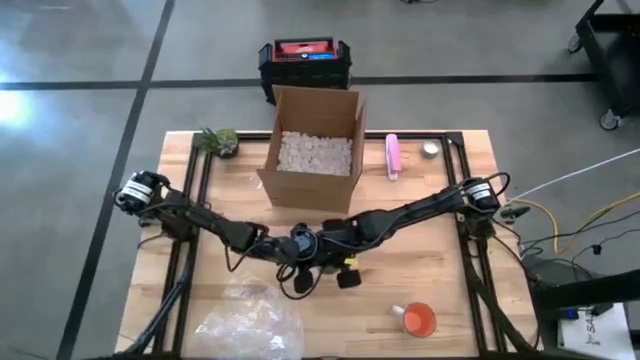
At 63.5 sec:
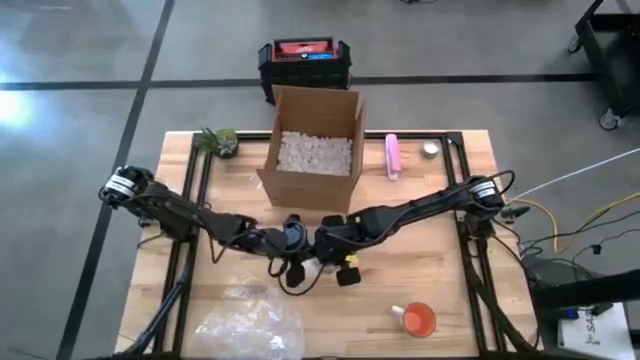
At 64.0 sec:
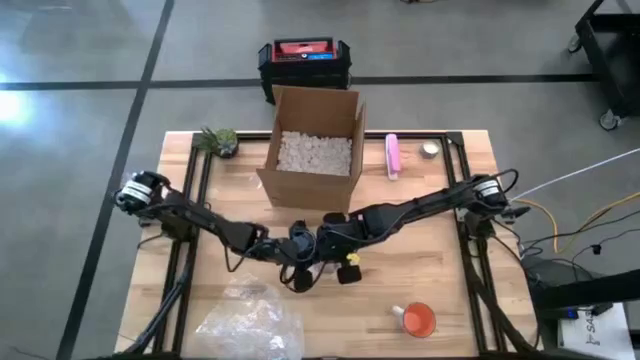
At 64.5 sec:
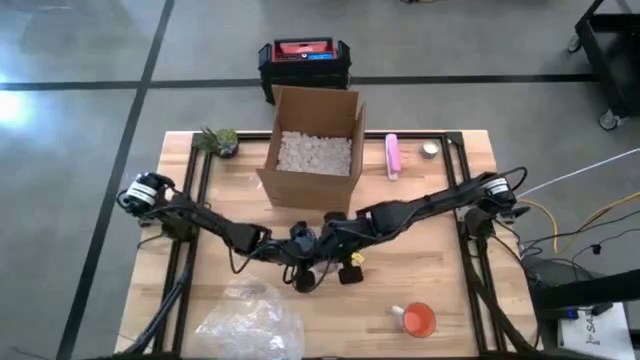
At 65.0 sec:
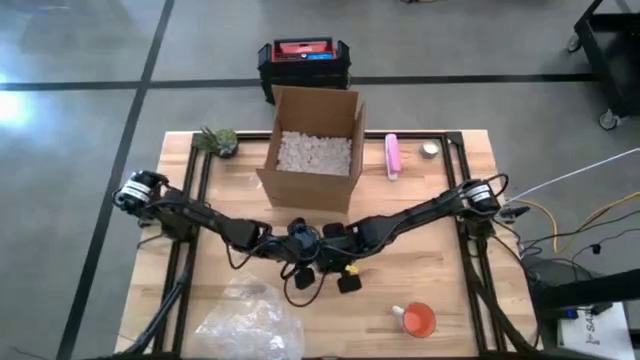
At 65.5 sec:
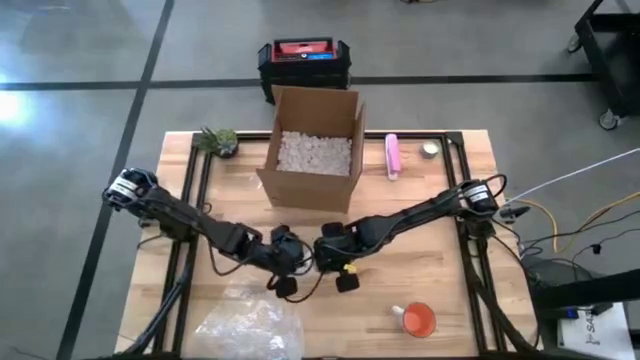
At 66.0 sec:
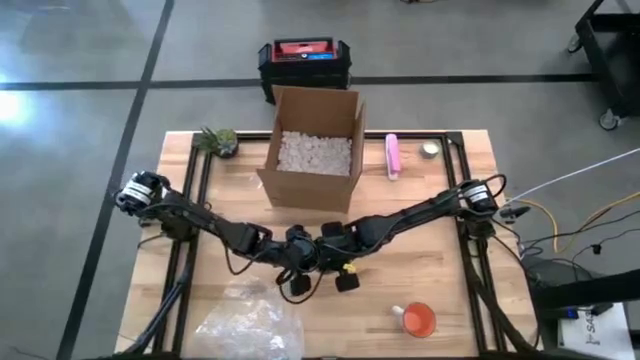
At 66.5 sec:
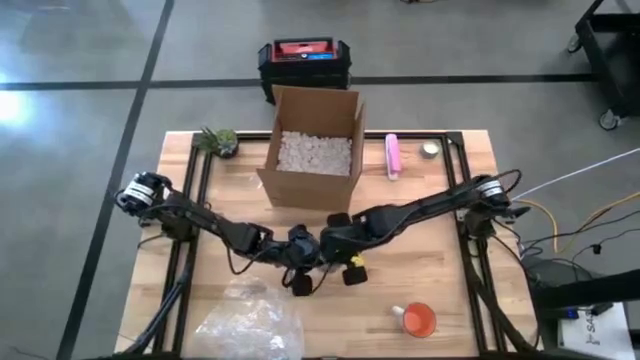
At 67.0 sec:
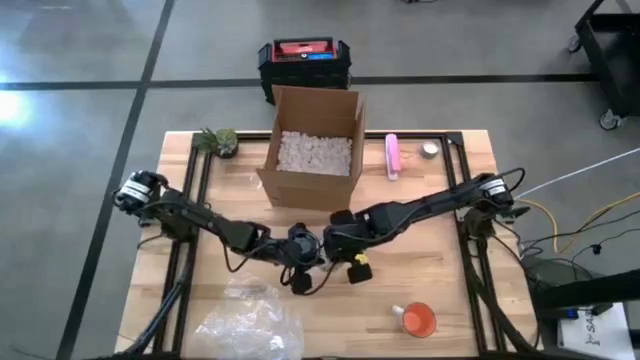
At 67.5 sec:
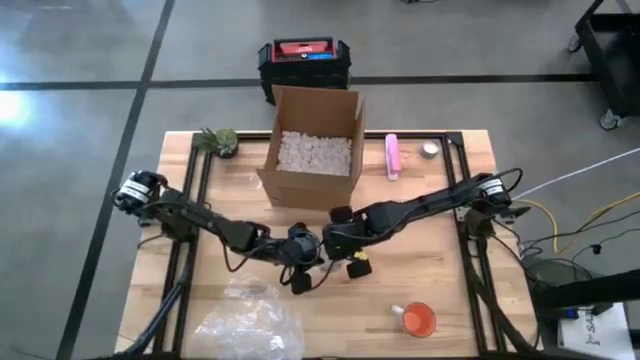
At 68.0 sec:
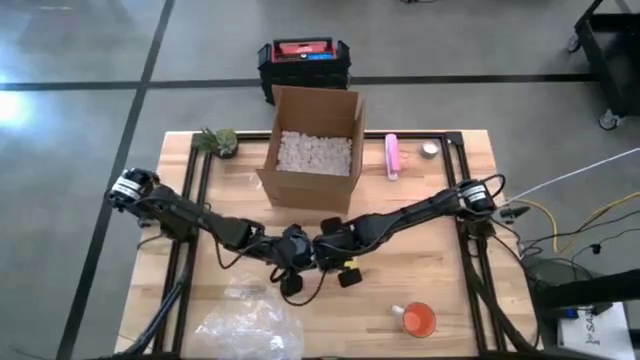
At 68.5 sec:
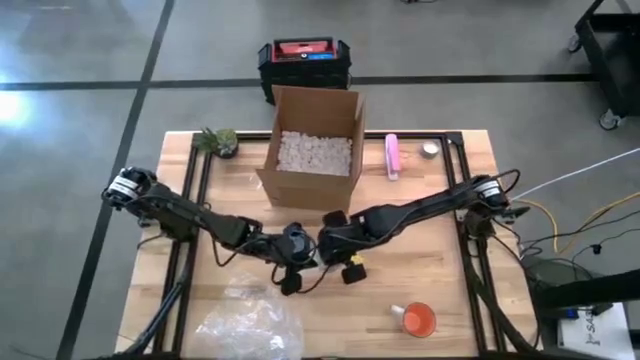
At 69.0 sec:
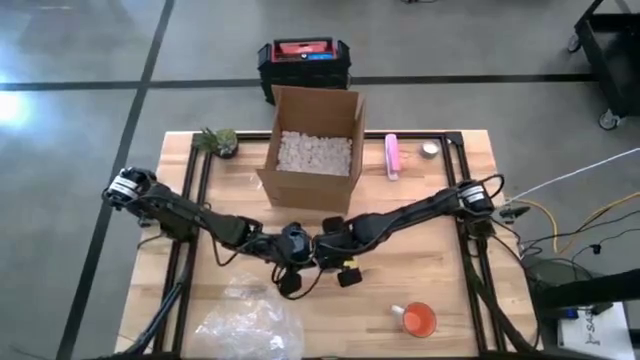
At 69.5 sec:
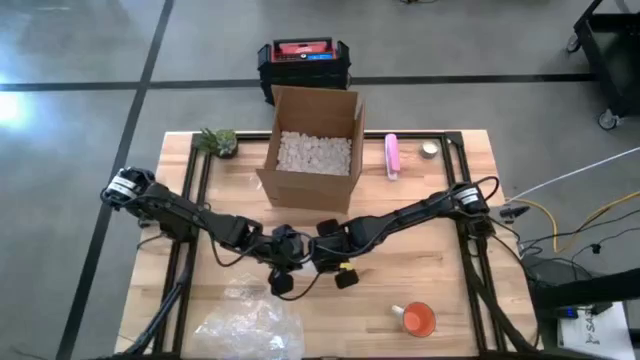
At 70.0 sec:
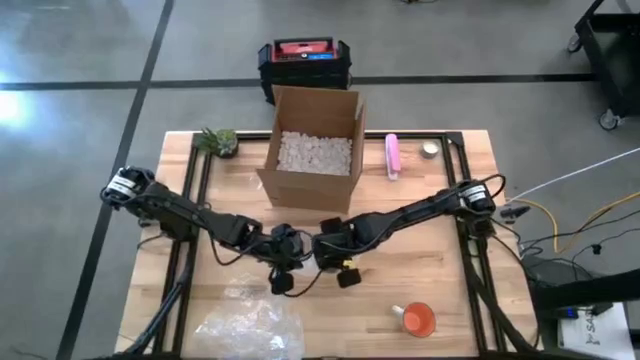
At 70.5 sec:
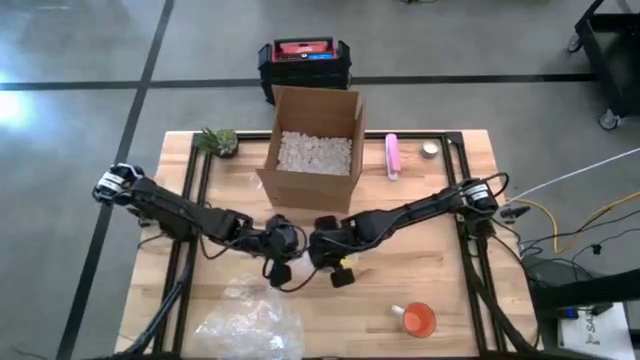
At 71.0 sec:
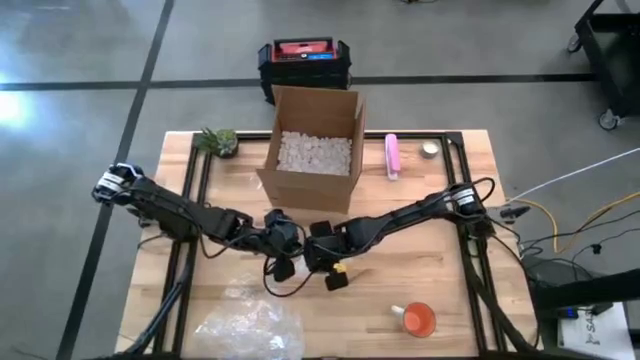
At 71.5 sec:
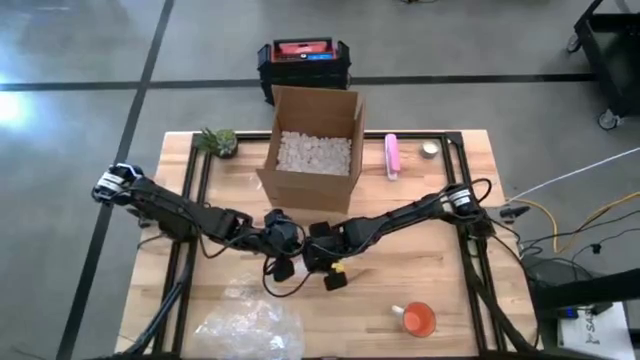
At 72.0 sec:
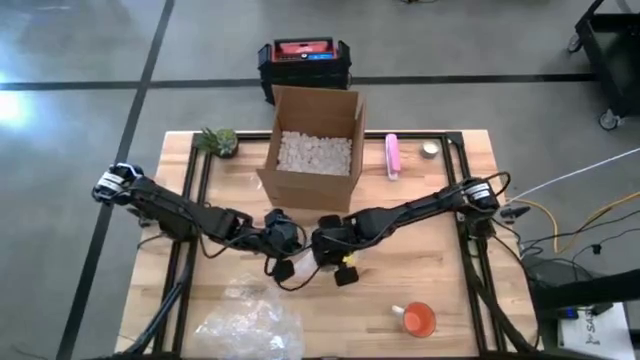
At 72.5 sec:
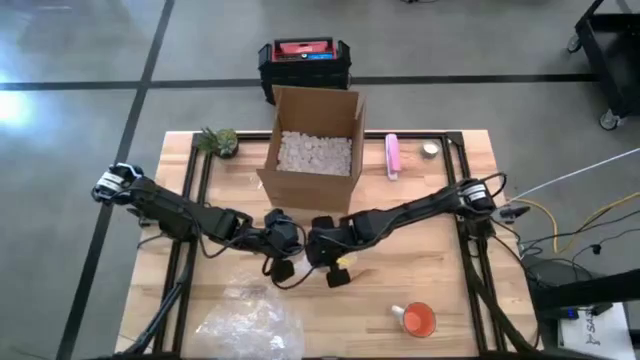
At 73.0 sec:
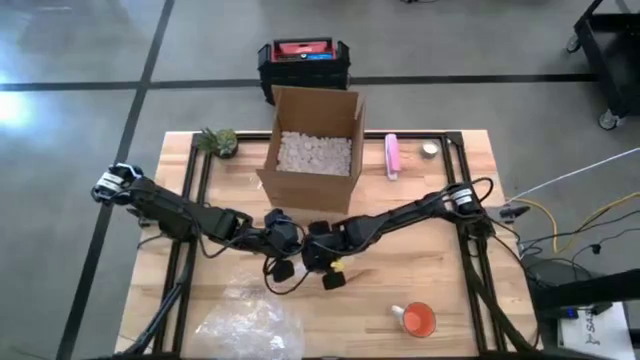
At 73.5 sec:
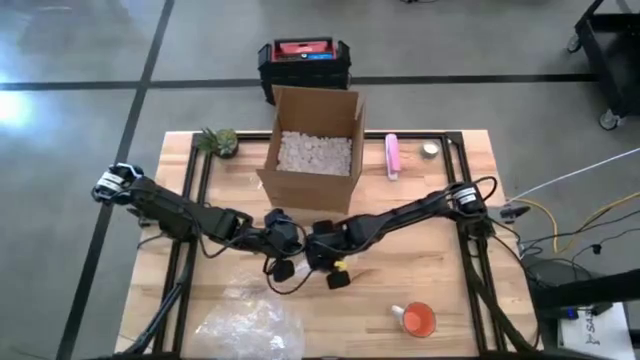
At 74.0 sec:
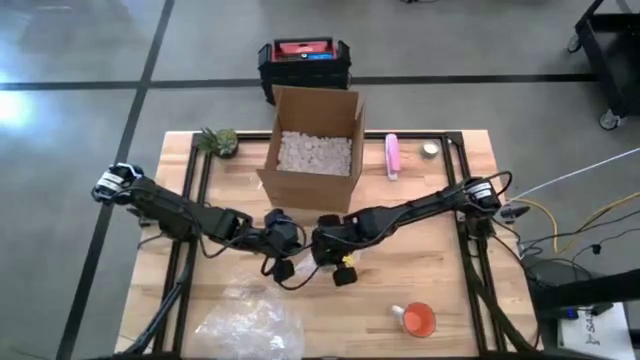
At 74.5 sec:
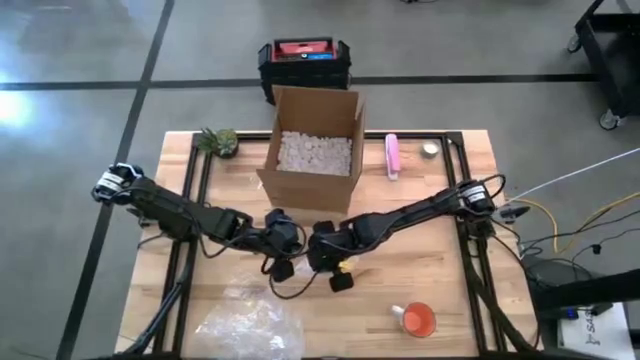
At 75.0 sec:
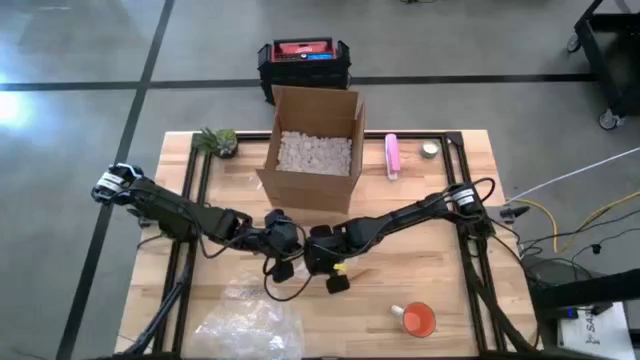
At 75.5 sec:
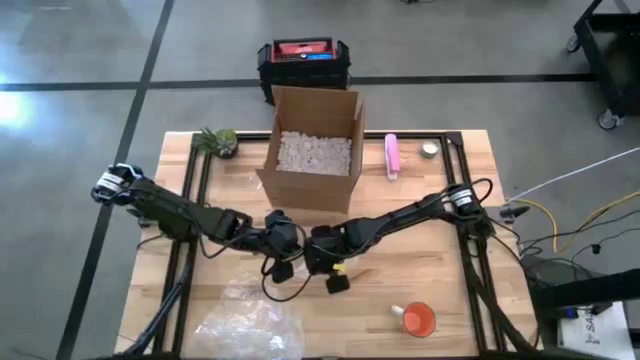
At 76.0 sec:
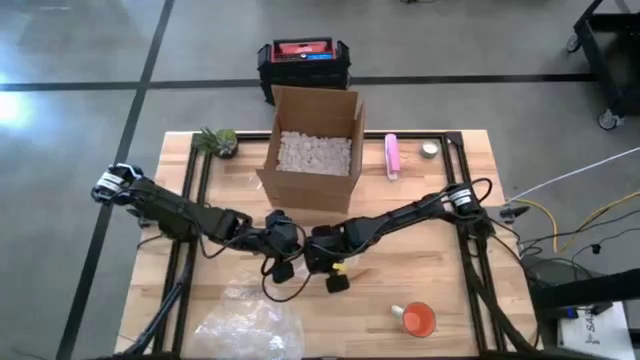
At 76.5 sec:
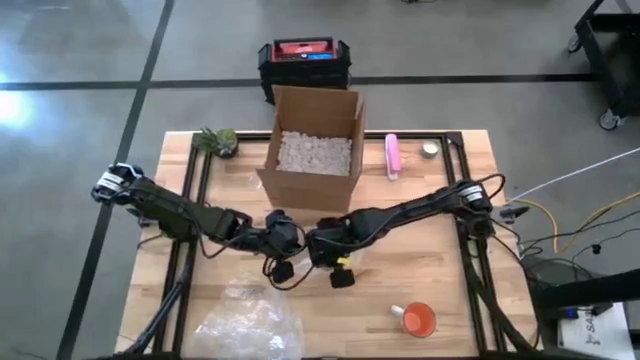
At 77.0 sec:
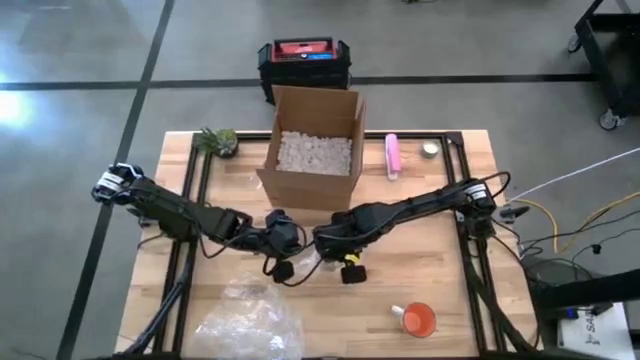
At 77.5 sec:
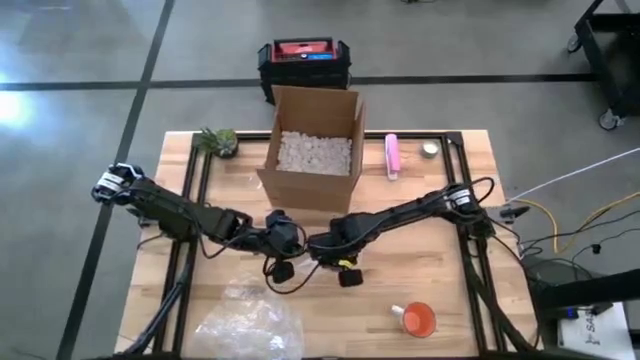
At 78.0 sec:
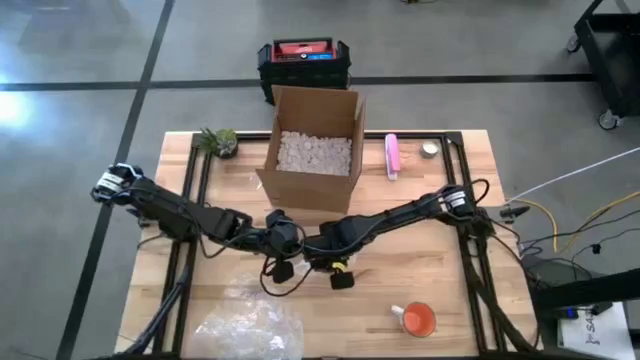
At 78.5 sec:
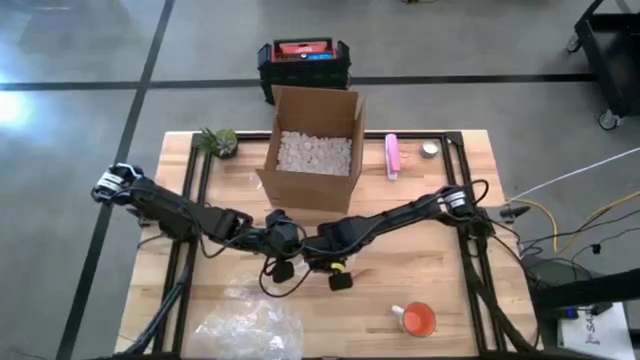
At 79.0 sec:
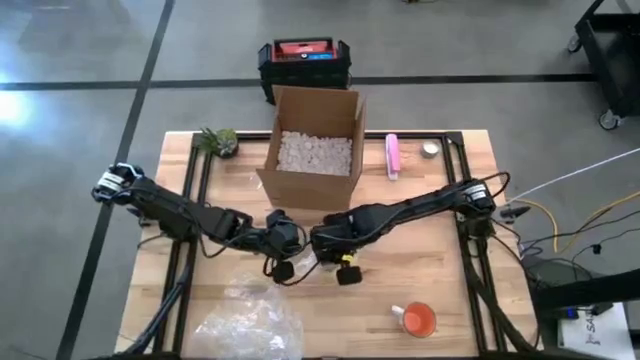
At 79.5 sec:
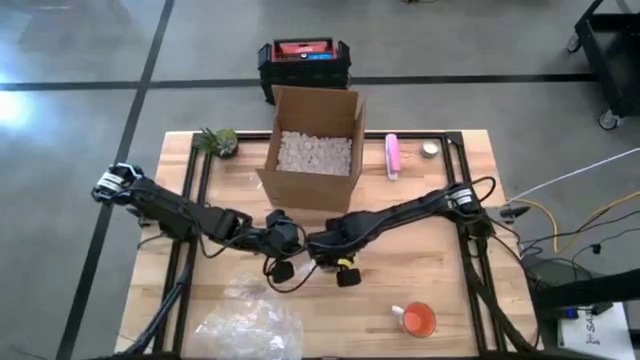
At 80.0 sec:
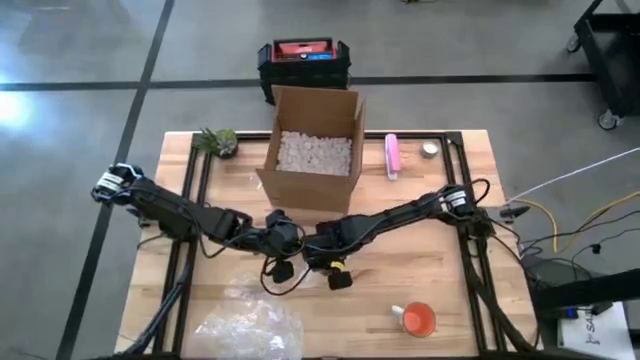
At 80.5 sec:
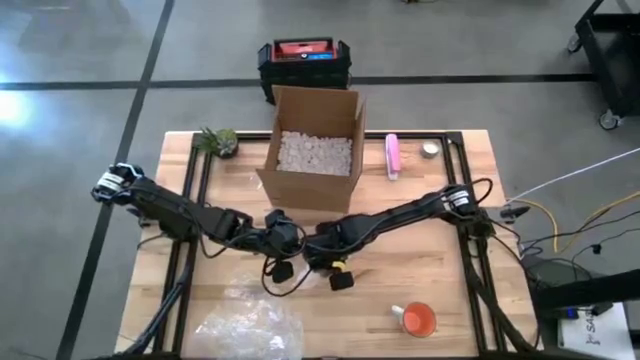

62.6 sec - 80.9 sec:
Task: wrap mug
Wrap the yellow mug with transparent bubble wrap

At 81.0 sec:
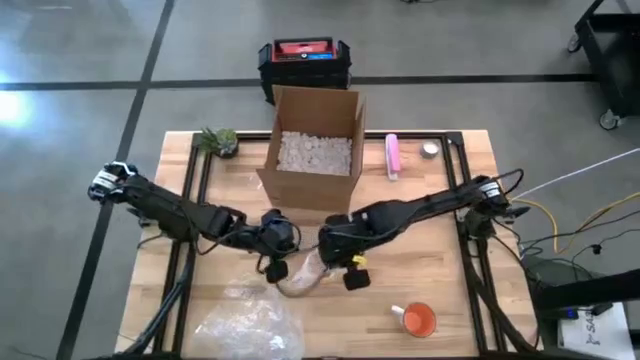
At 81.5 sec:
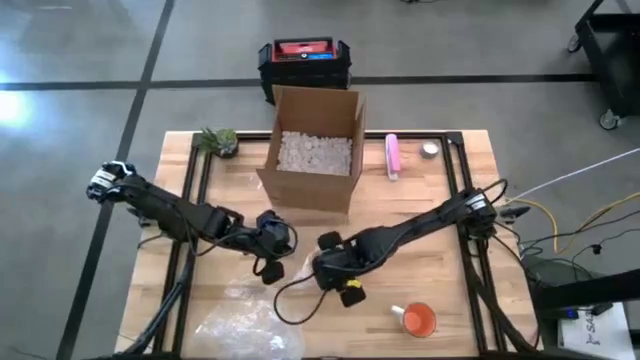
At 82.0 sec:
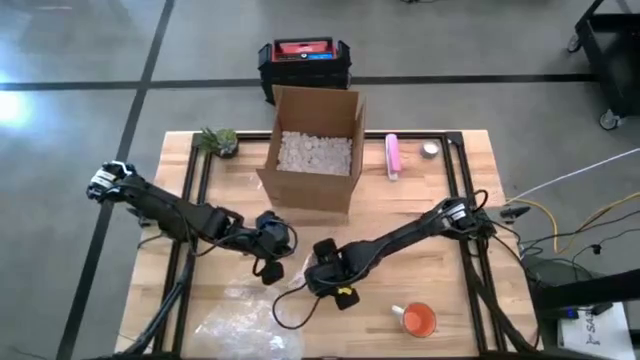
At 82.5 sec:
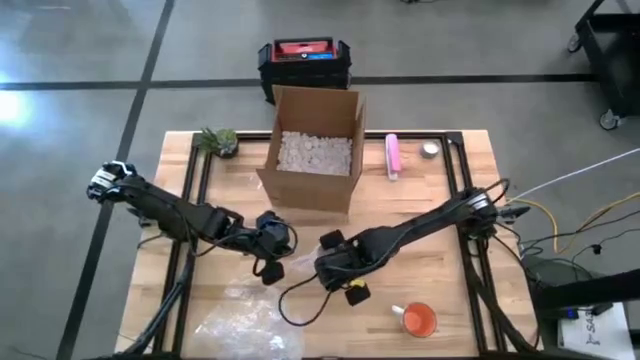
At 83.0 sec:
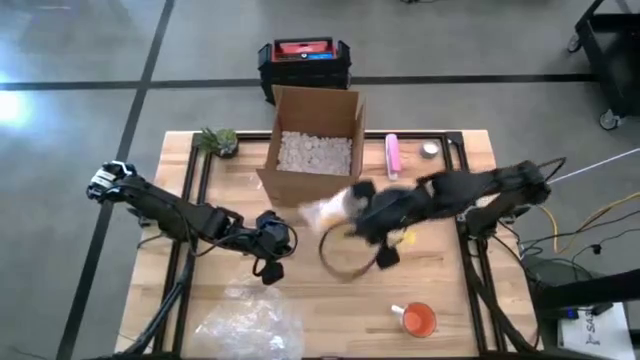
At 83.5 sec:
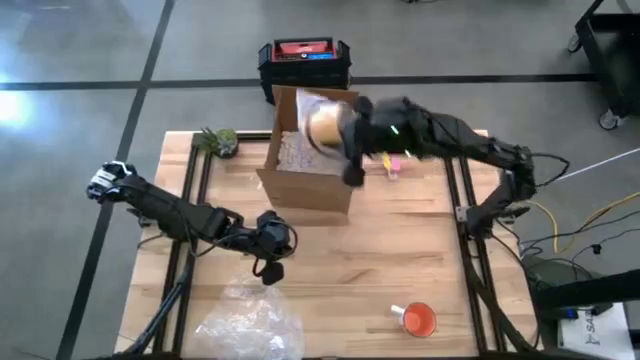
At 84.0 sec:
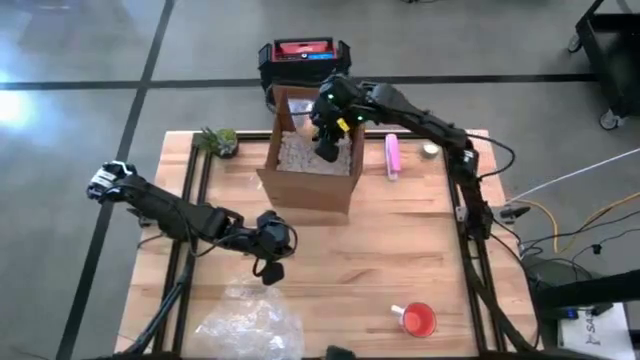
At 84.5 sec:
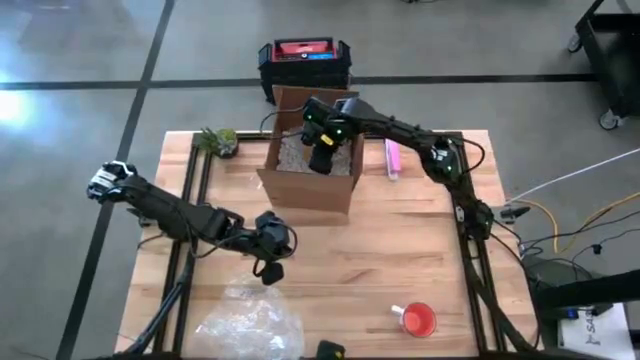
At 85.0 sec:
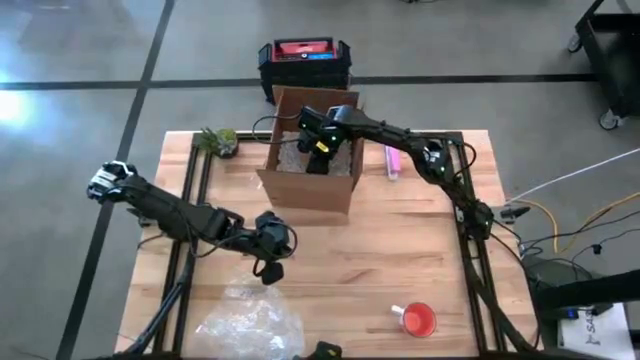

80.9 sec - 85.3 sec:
Put the wrapped yellow mug into the brown cardboard box
